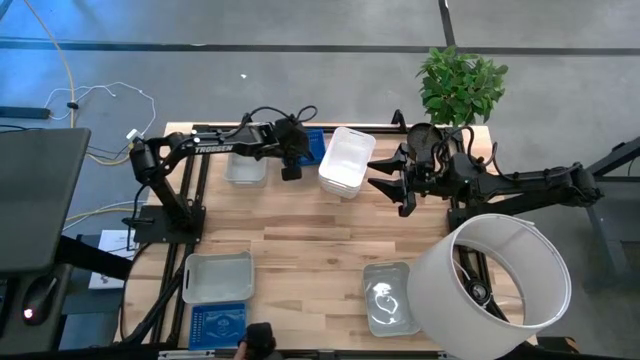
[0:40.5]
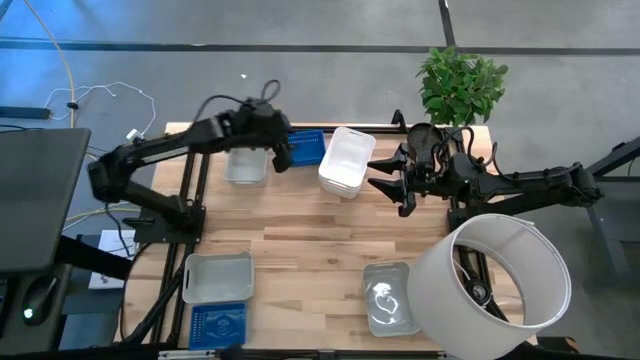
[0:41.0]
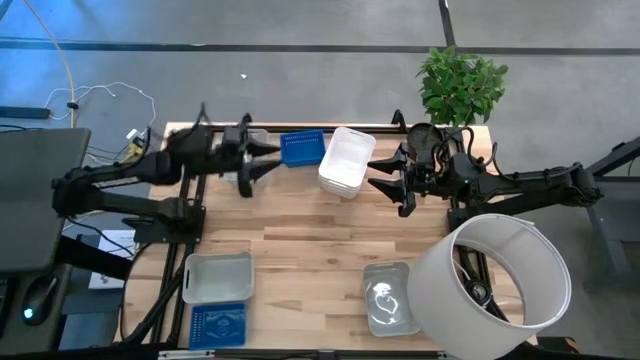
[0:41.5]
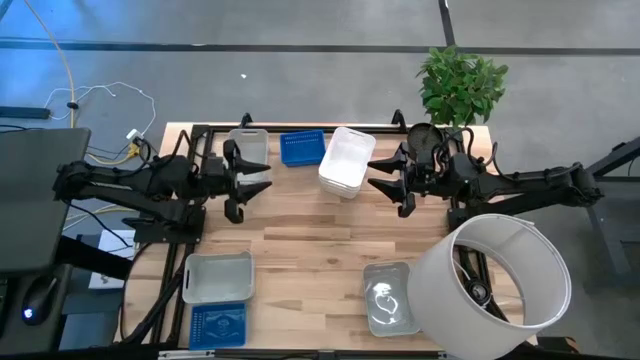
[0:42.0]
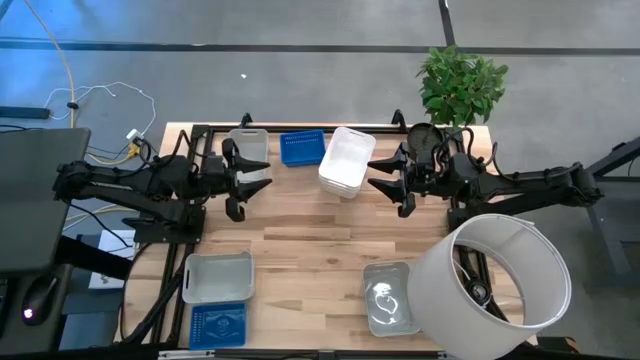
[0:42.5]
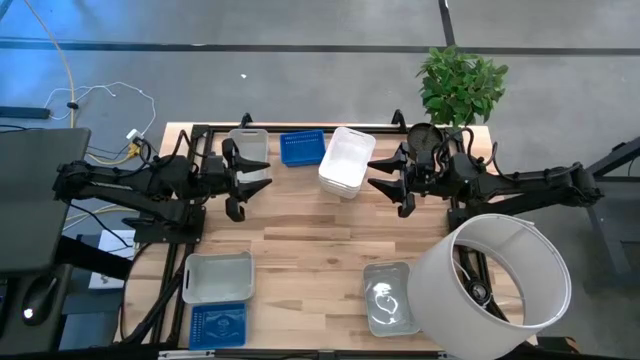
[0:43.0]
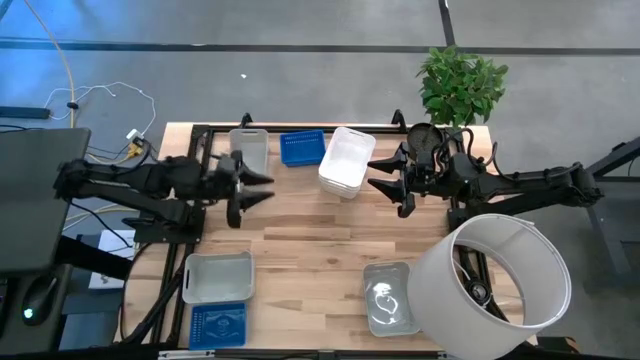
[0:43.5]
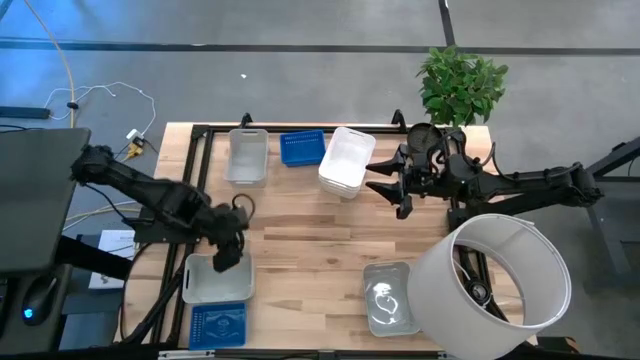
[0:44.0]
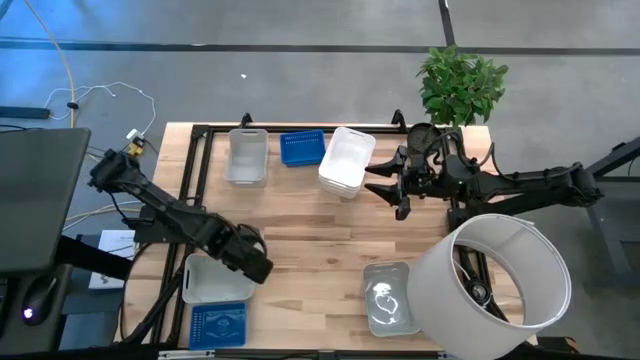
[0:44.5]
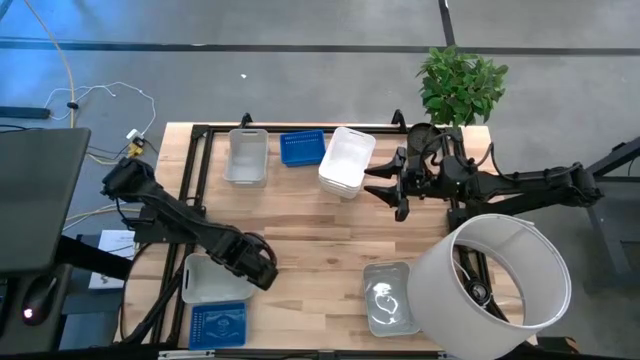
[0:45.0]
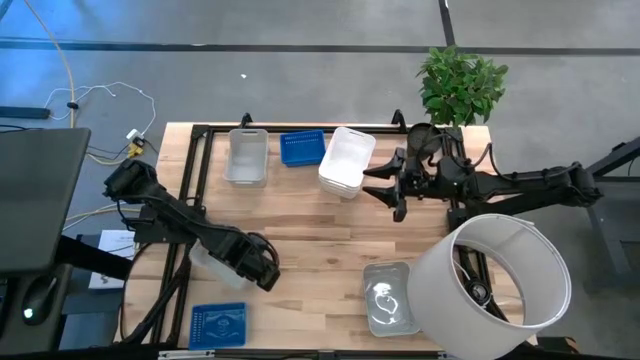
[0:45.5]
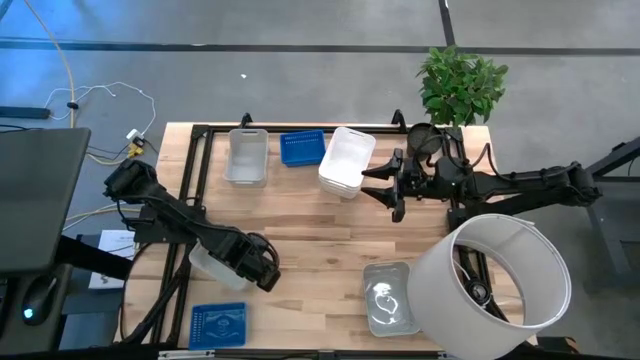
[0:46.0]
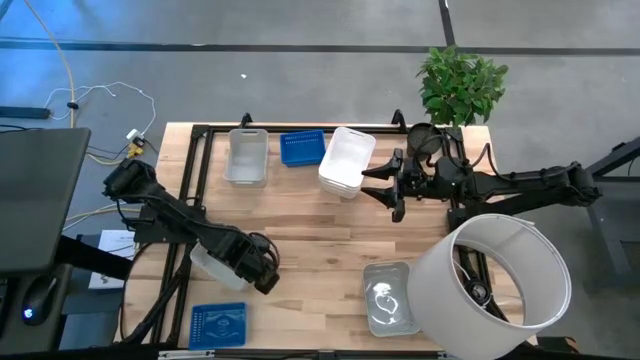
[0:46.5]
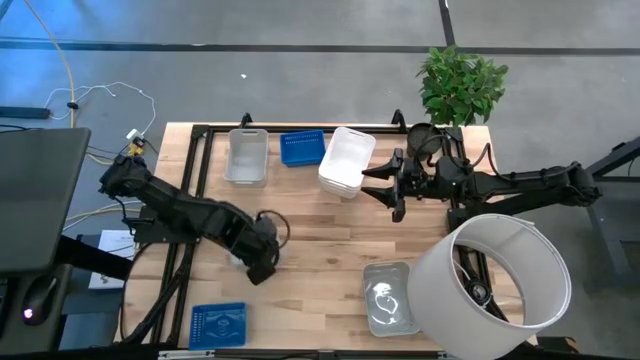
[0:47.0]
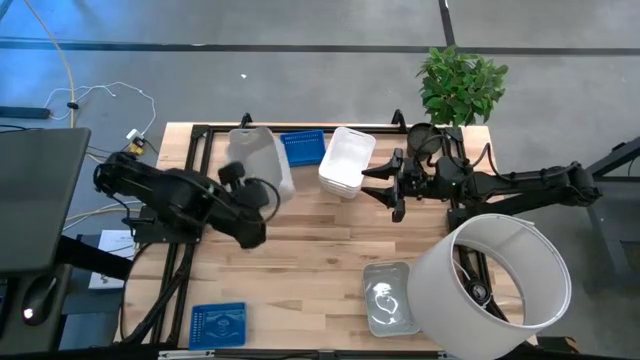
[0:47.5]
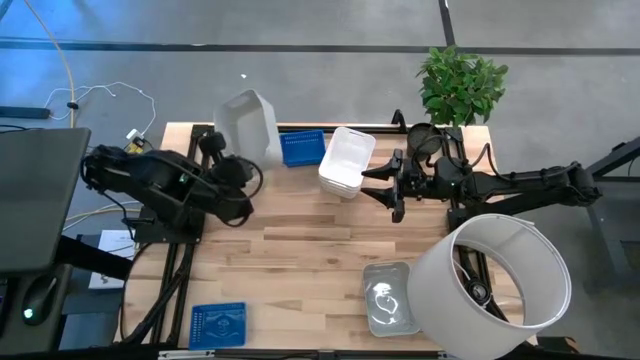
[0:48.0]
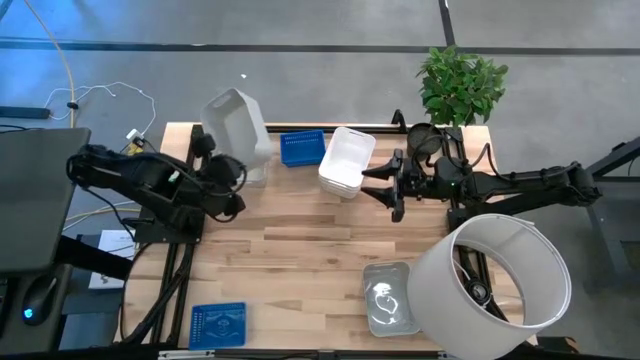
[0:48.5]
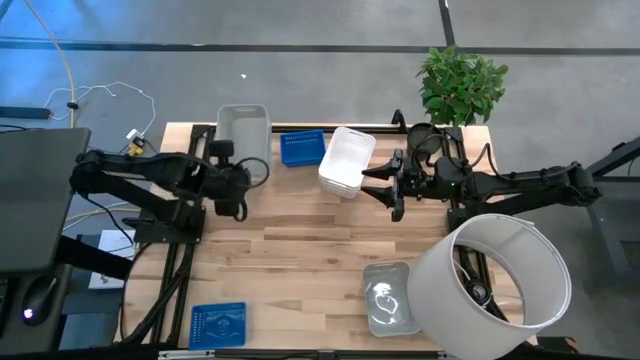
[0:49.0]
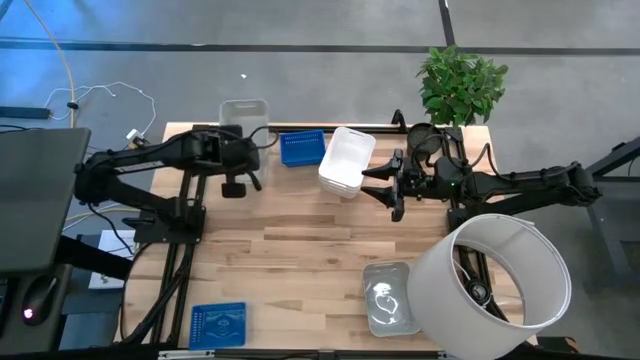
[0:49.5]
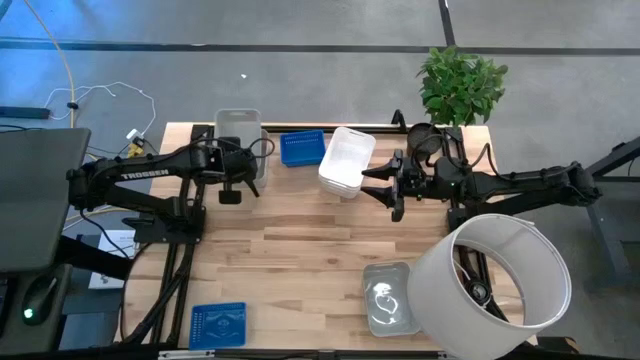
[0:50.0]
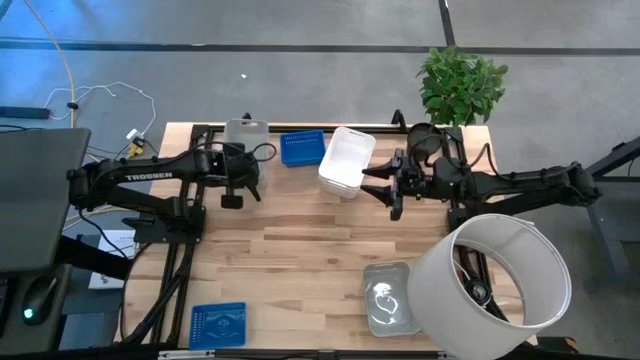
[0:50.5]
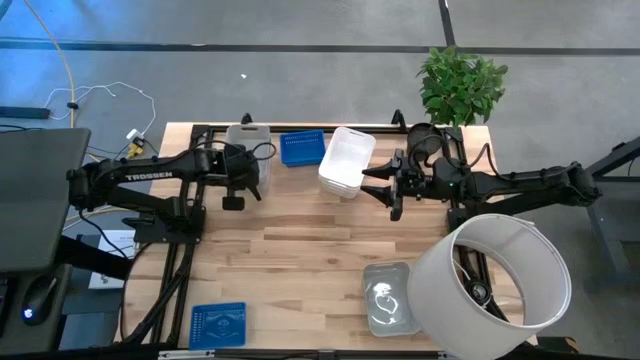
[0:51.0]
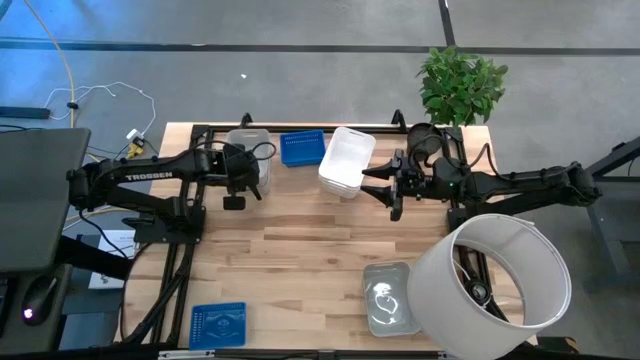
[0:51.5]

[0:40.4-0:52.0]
Stack the bottom left gray bin on the top gray bin
